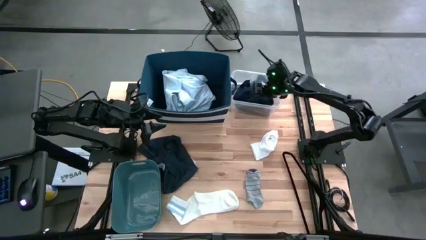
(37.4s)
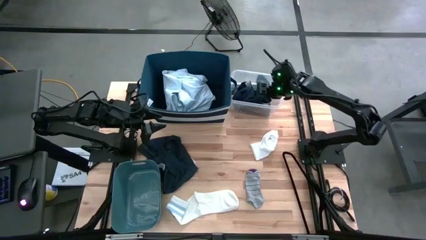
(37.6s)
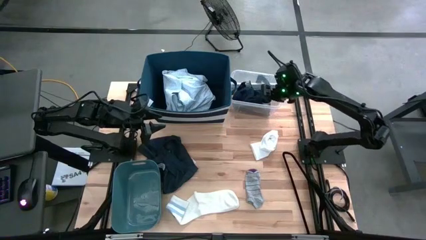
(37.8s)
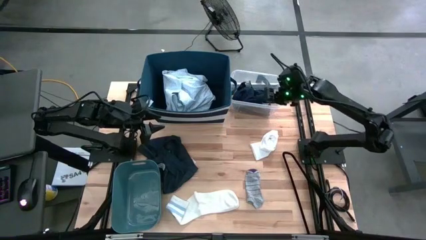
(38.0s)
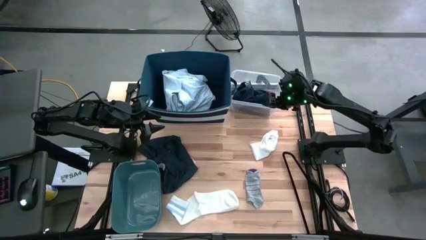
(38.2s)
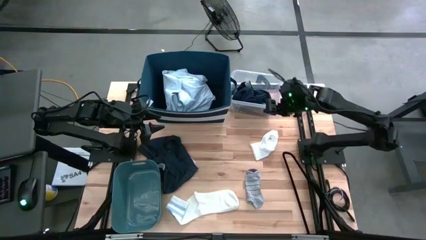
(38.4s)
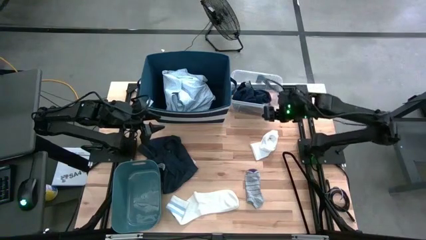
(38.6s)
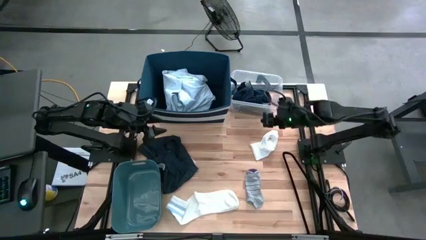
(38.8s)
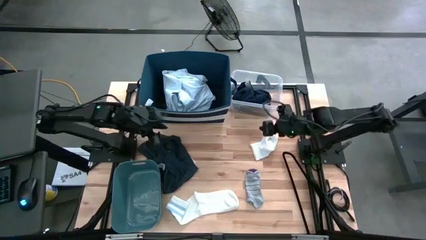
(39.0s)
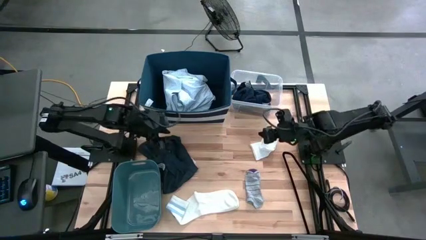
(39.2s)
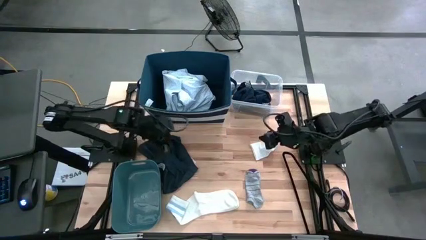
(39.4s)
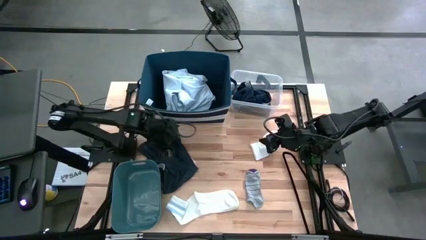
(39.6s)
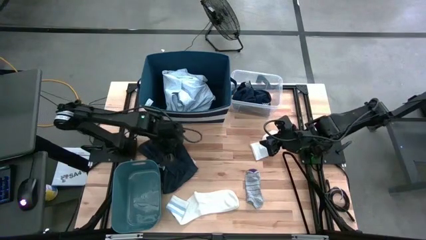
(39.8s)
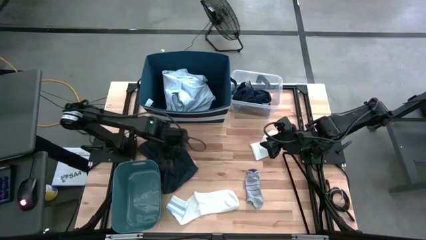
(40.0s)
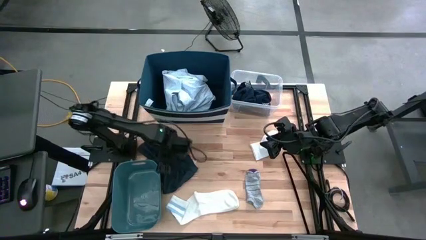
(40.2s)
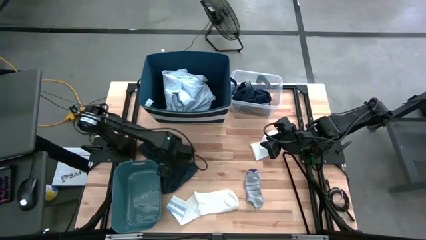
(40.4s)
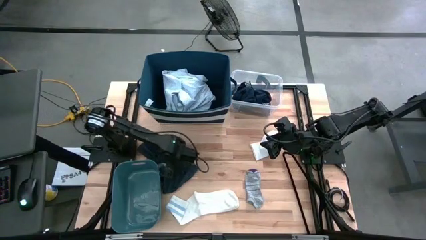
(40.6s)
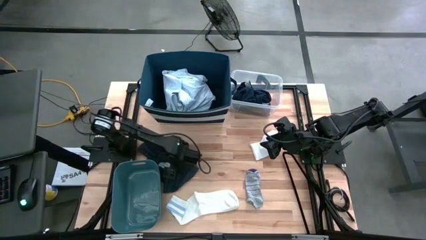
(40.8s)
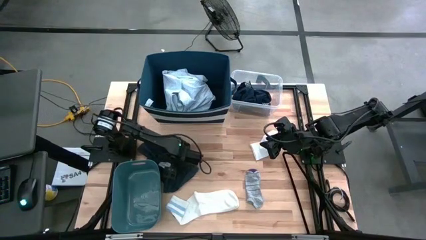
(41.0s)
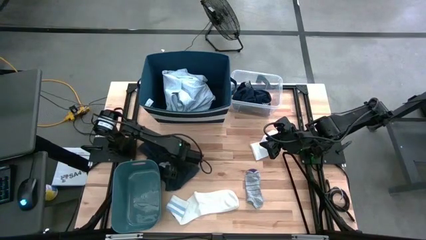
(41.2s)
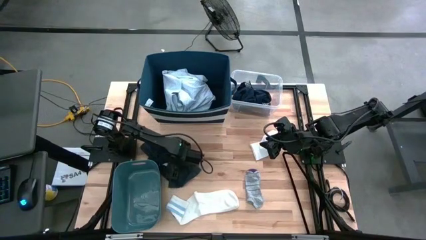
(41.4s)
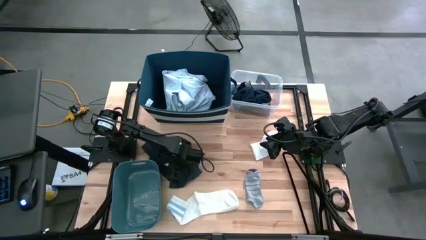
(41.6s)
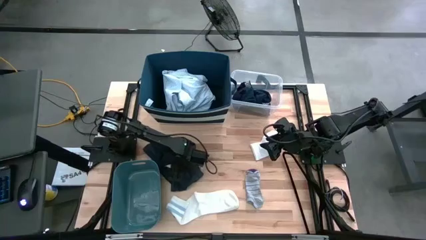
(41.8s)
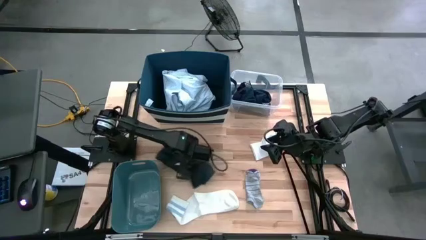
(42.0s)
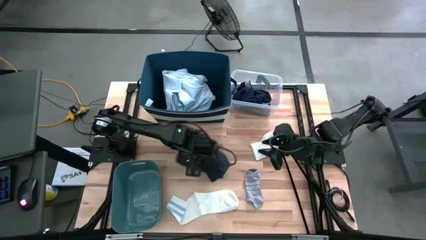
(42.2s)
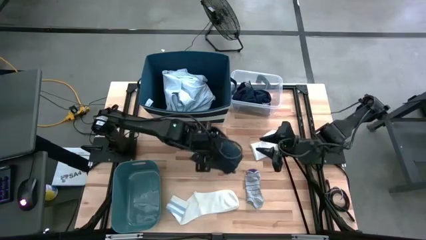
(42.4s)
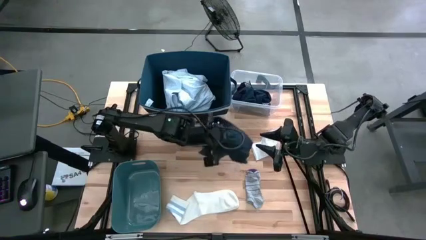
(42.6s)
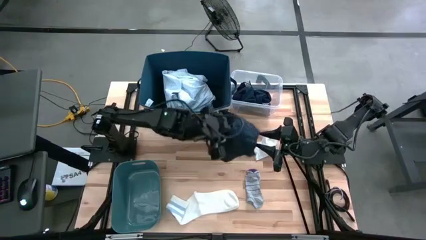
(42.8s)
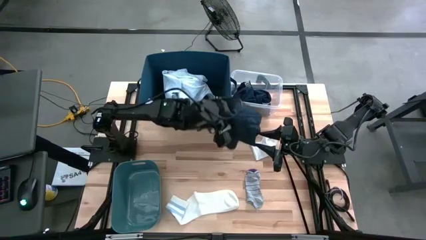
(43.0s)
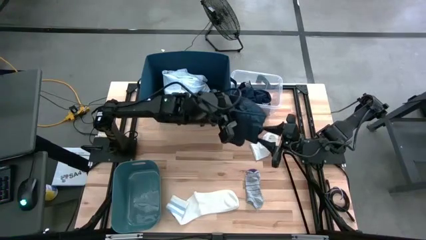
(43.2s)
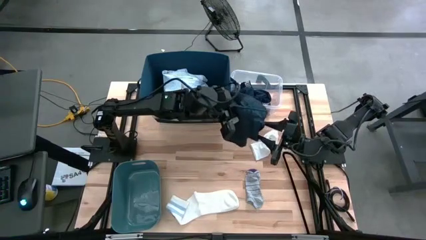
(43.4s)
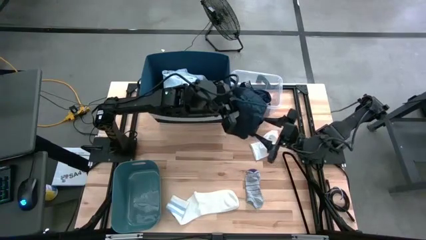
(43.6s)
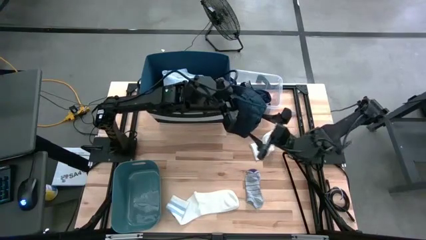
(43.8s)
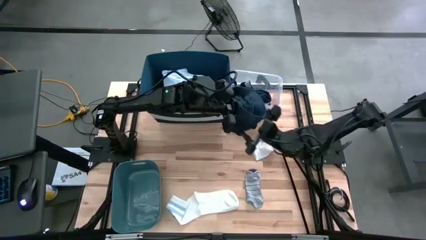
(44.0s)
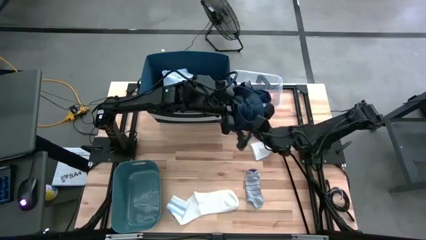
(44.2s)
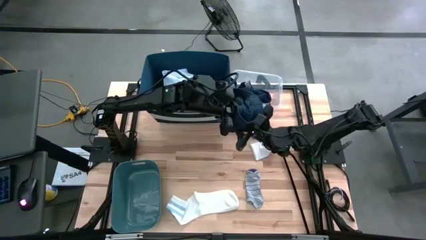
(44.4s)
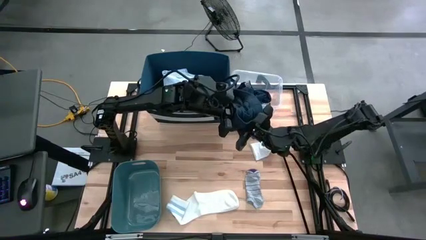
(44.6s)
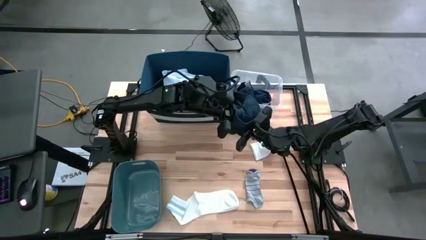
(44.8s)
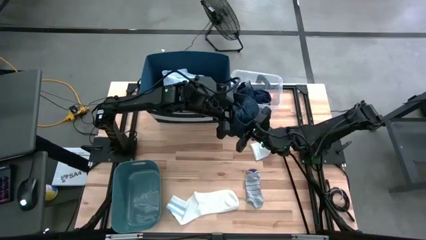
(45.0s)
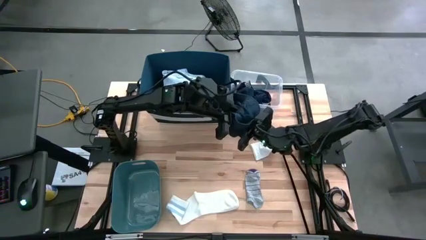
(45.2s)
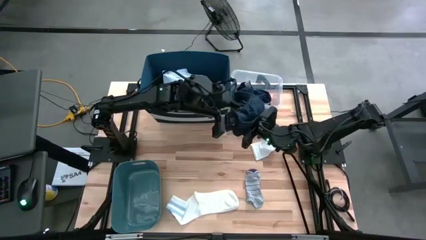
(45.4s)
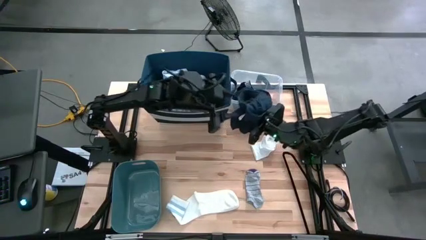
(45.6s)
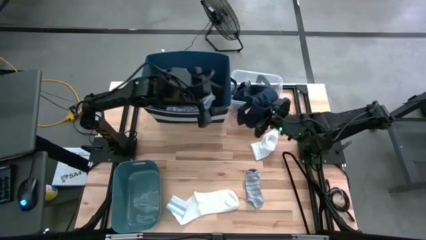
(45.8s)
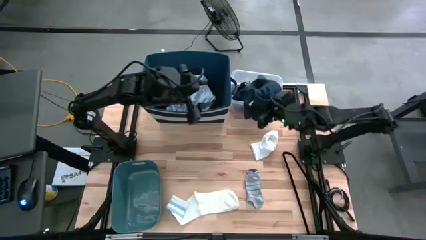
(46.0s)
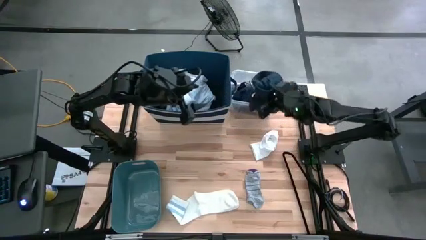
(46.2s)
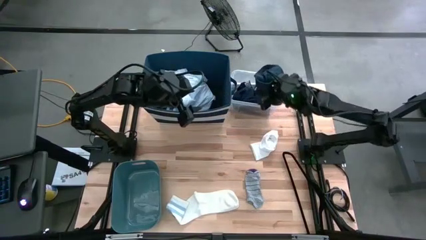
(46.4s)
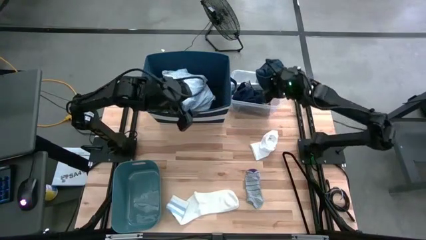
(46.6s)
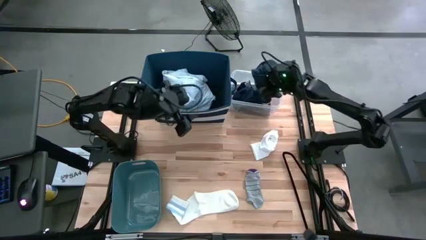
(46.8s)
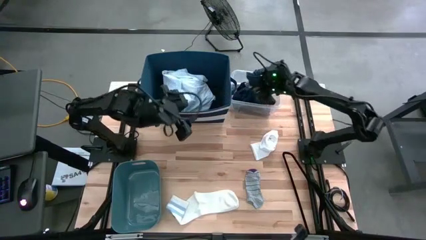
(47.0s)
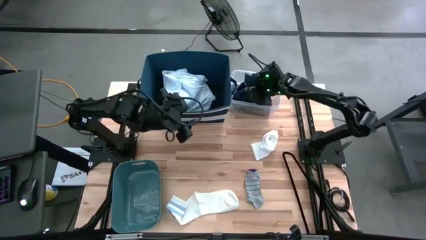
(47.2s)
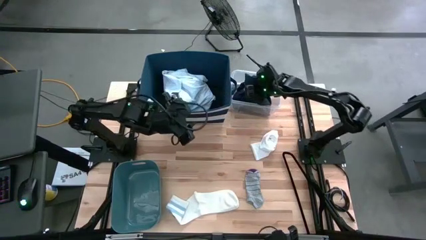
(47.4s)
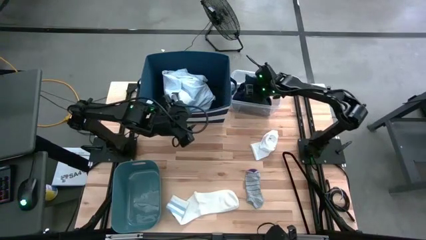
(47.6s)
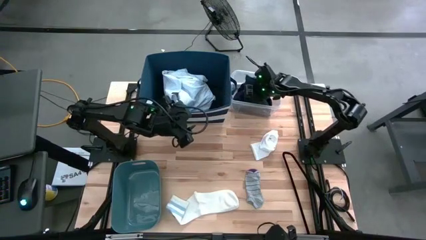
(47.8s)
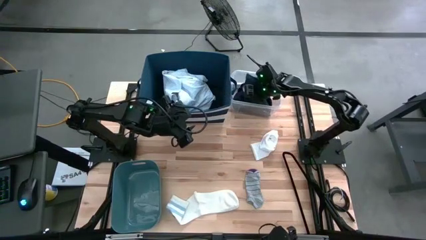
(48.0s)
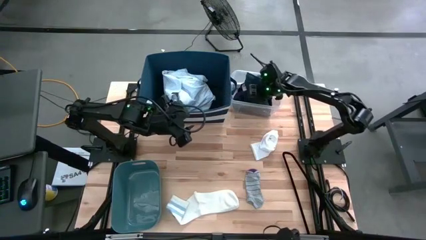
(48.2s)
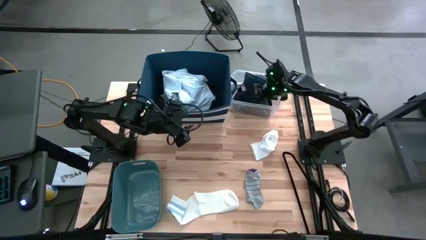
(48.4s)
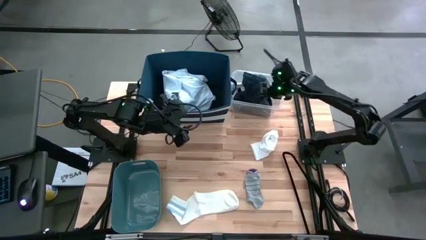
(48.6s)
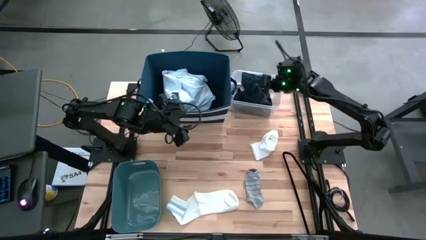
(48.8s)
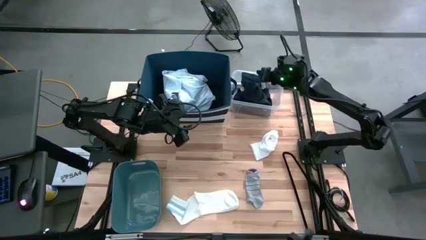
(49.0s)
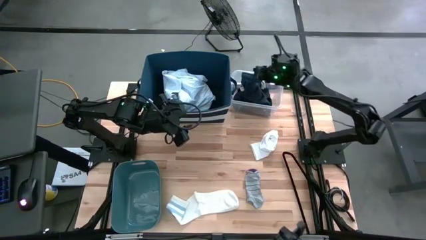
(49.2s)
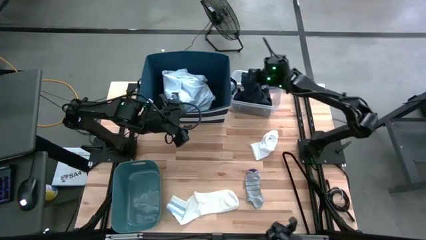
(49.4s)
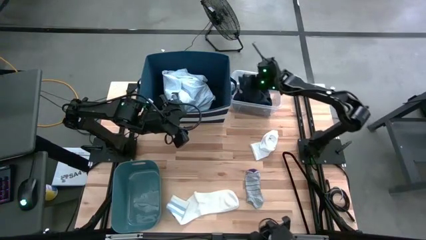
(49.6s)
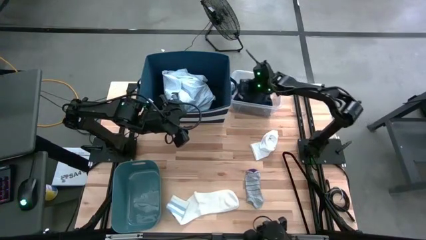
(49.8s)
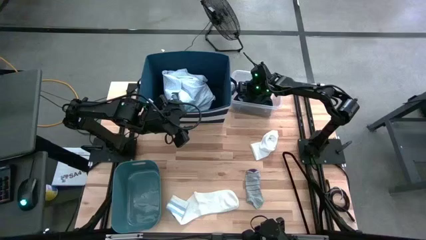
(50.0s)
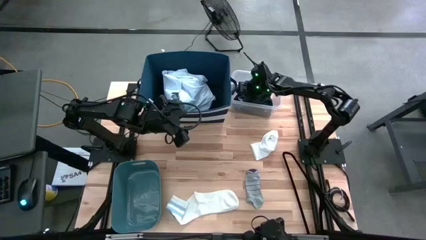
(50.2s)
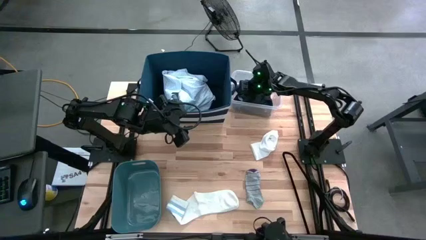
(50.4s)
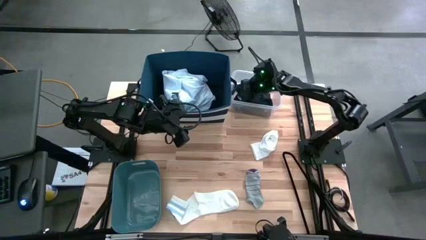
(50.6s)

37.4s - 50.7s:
Task: Pick & Place Cloths
Put the blue underwear into the transparent bin

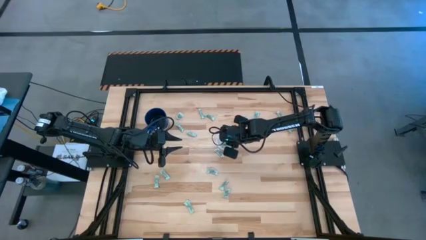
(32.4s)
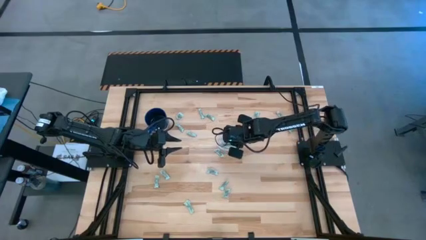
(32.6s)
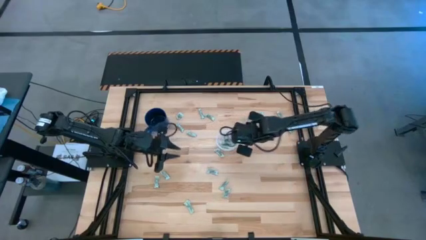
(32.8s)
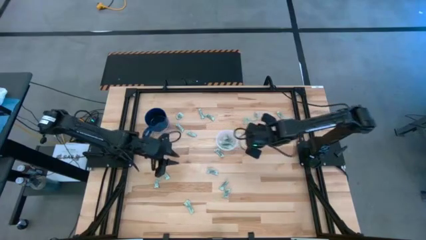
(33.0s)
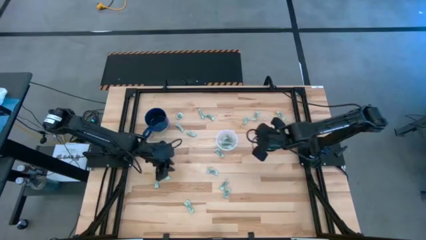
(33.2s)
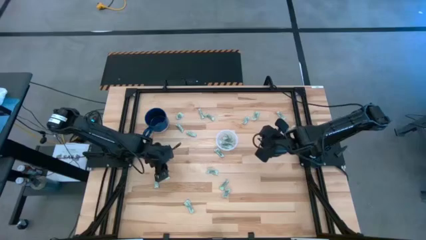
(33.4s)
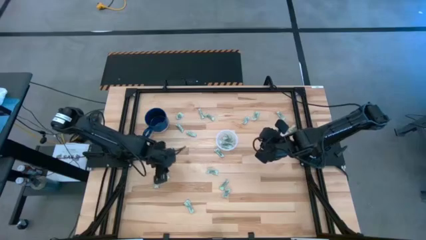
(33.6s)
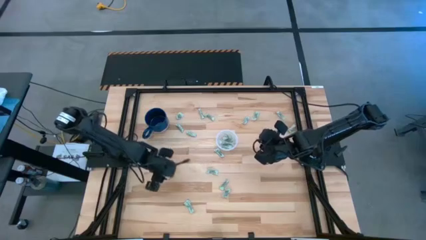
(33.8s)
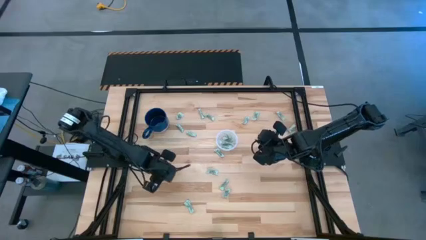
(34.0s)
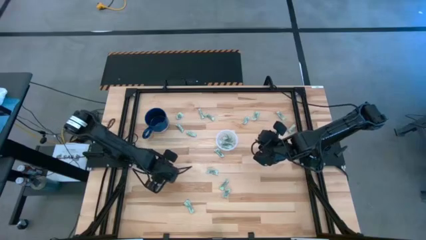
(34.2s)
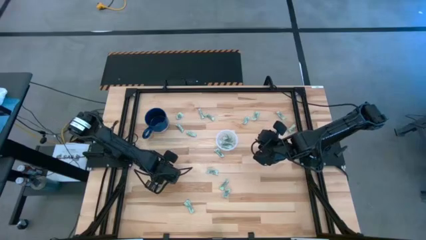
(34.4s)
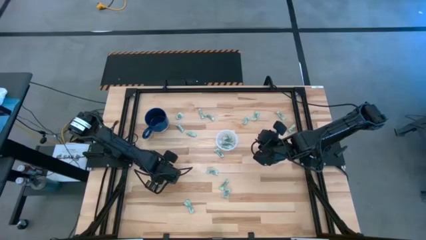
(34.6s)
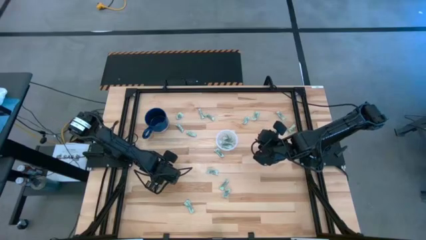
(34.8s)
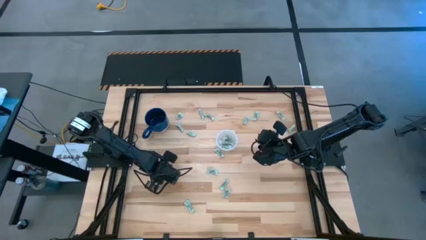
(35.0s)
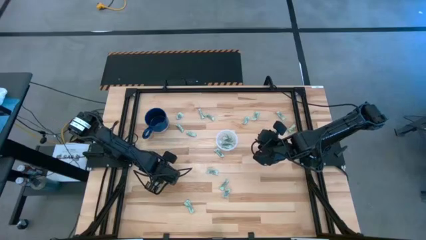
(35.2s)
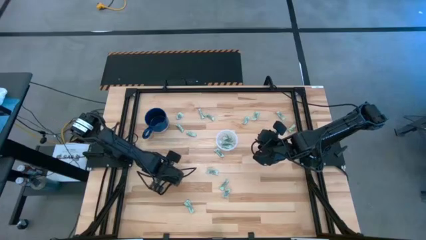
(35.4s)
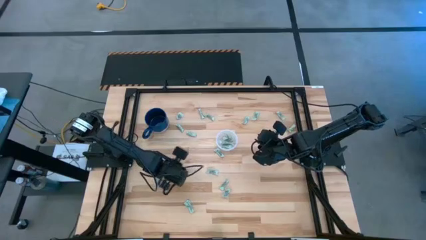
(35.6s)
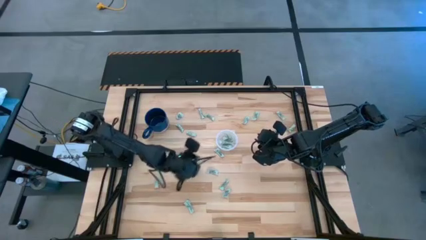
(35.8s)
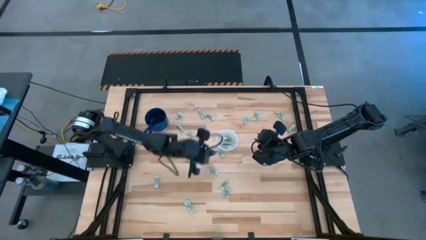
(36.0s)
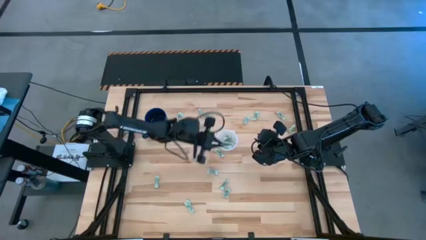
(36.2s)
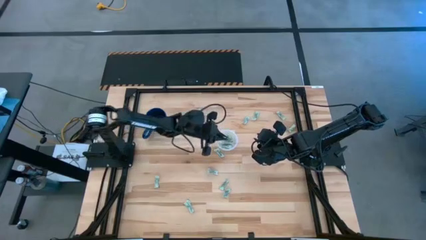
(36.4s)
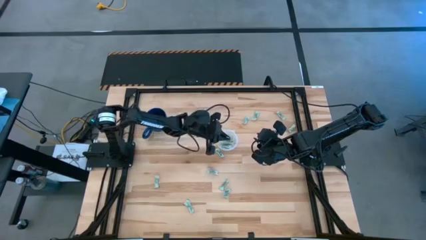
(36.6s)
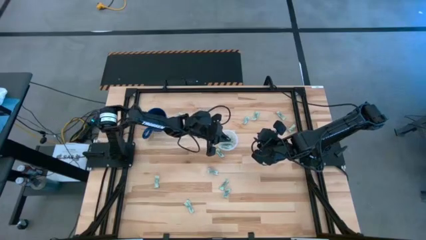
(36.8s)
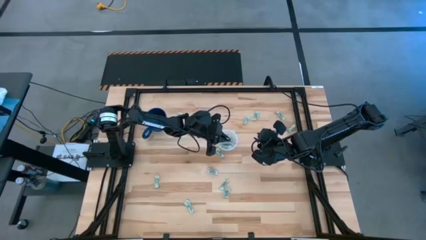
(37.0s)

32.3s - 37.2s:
Task: Pick and place items into bin
Put the gray stevia packet into the transparent bin
